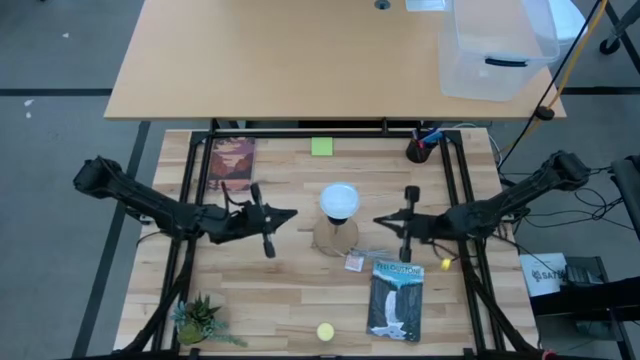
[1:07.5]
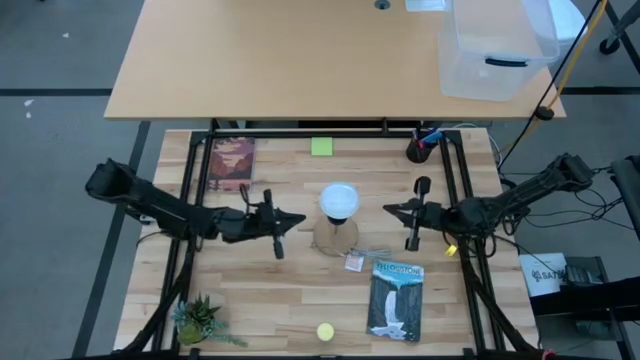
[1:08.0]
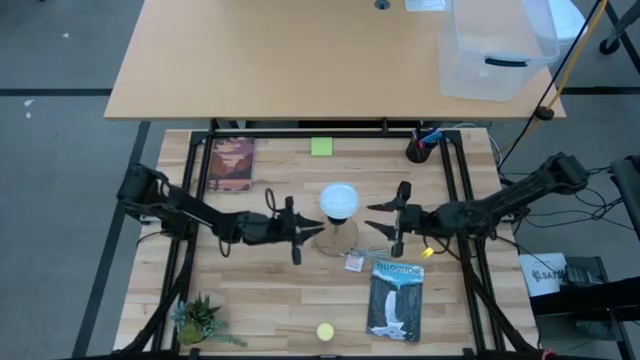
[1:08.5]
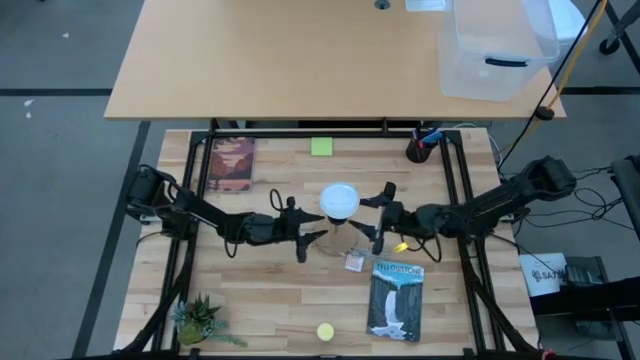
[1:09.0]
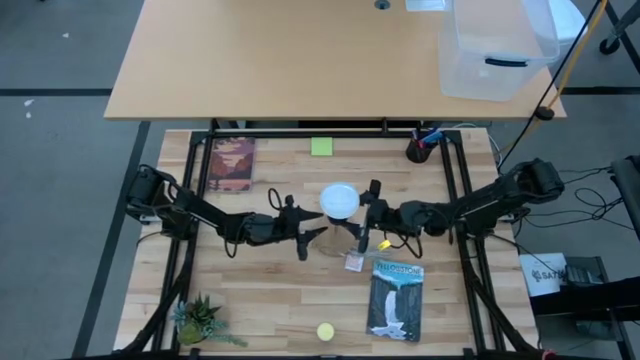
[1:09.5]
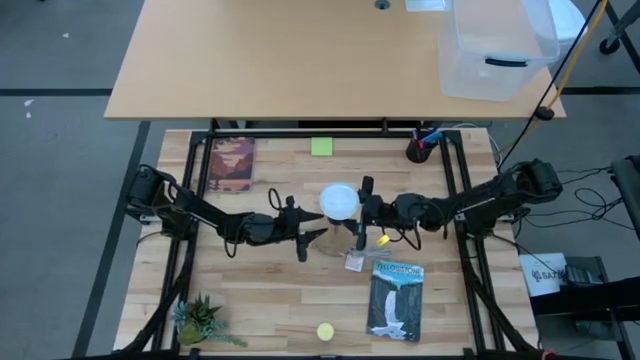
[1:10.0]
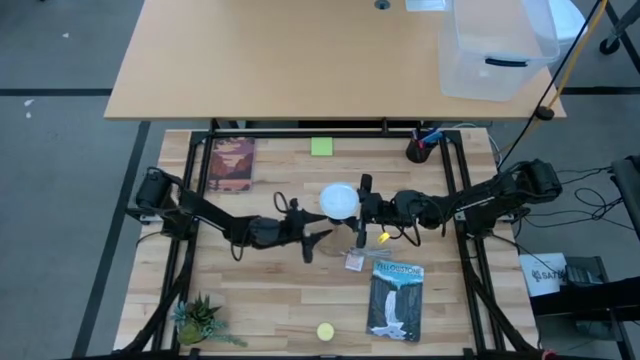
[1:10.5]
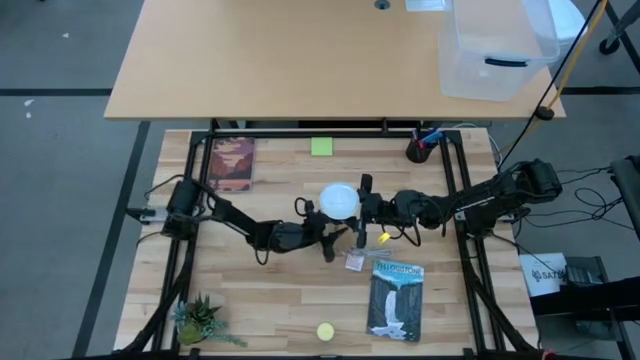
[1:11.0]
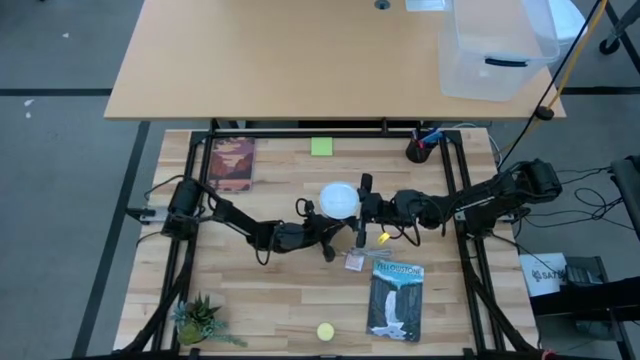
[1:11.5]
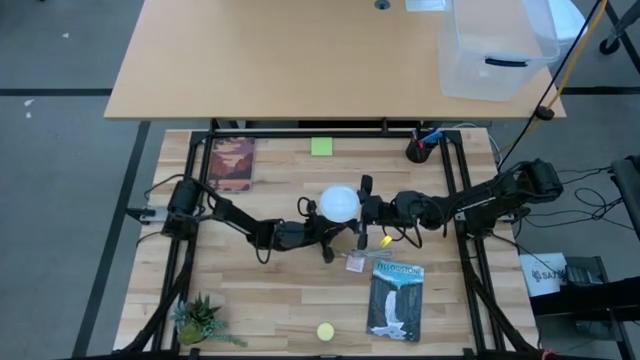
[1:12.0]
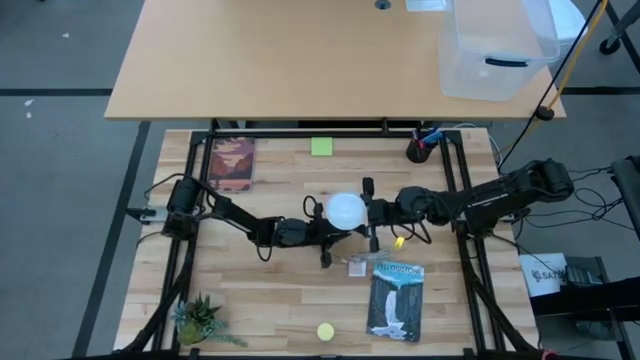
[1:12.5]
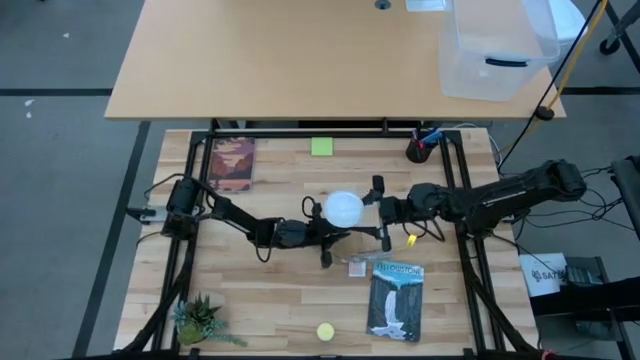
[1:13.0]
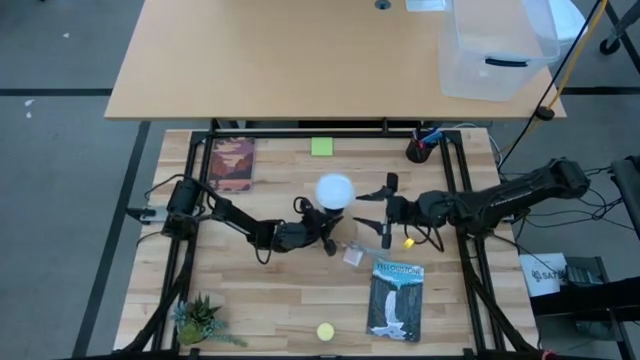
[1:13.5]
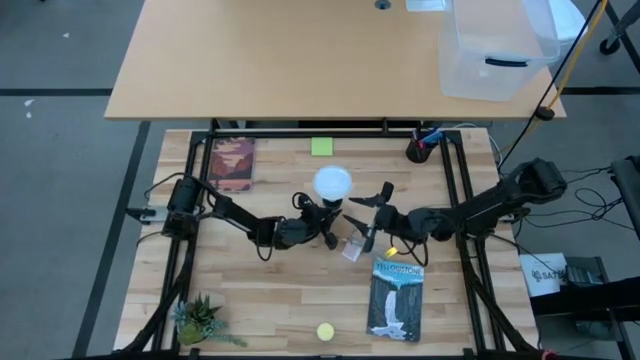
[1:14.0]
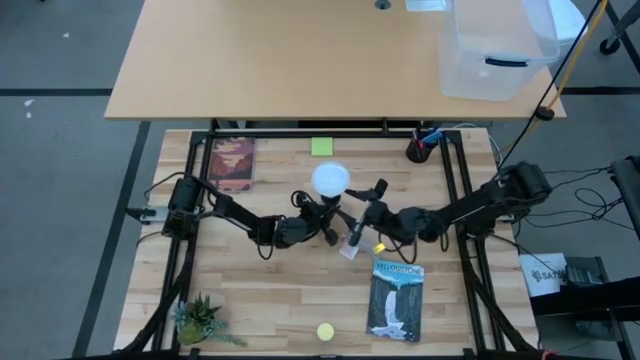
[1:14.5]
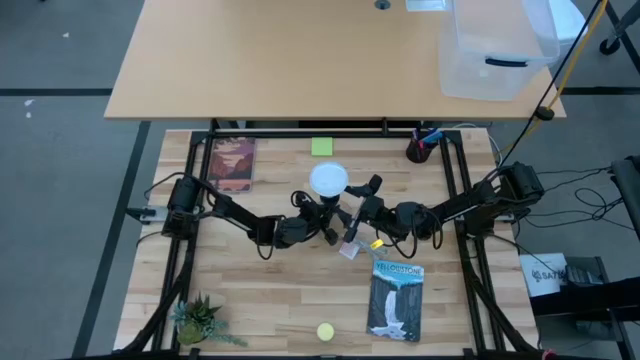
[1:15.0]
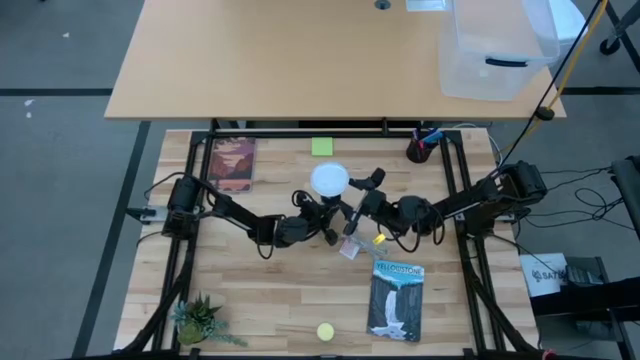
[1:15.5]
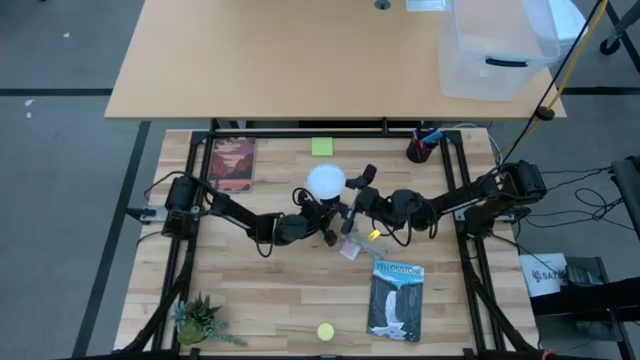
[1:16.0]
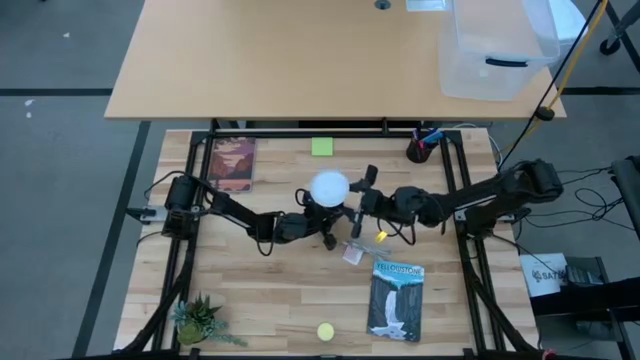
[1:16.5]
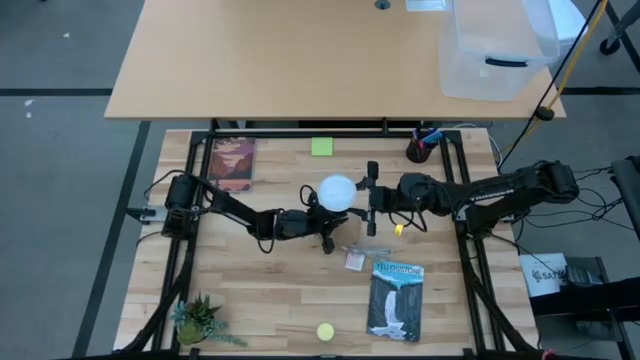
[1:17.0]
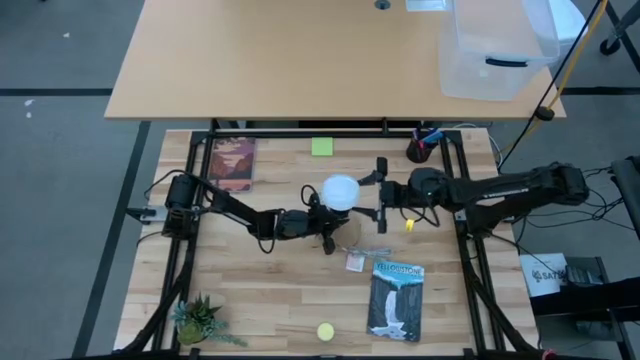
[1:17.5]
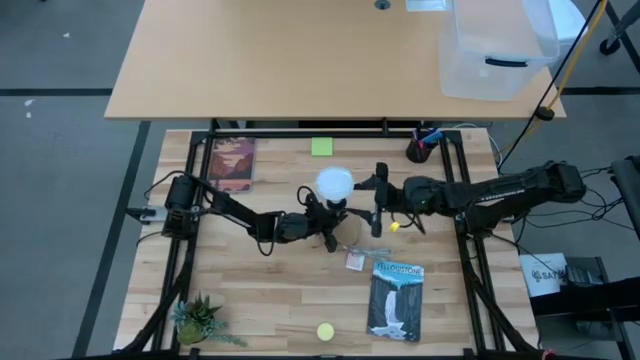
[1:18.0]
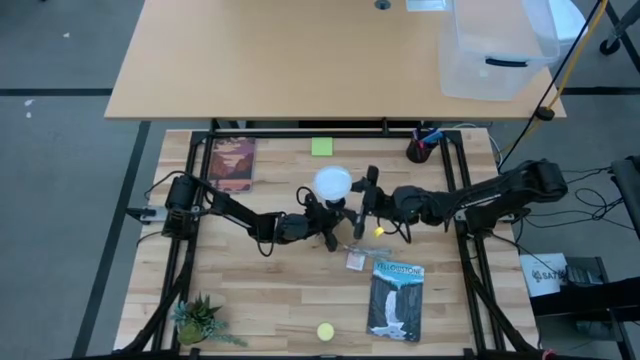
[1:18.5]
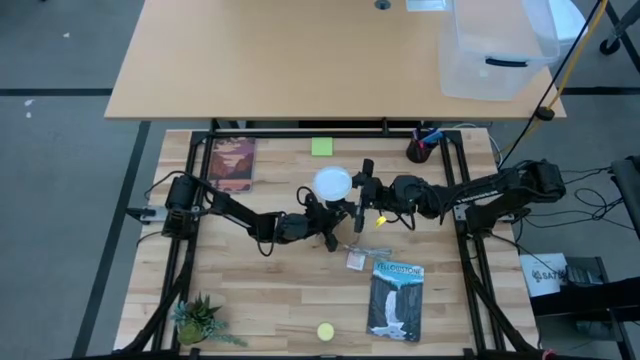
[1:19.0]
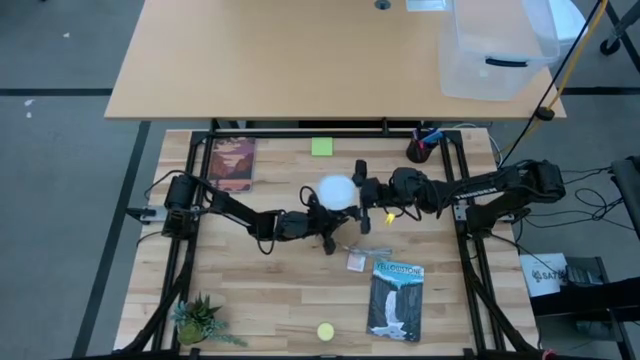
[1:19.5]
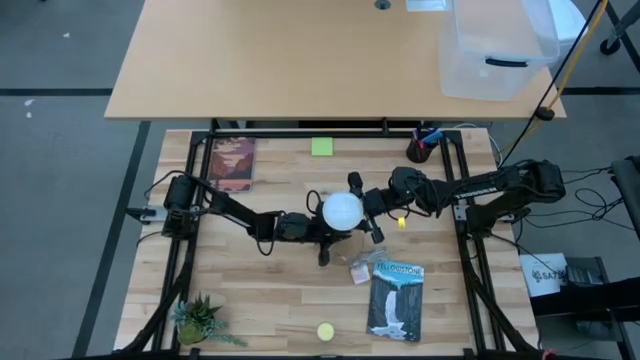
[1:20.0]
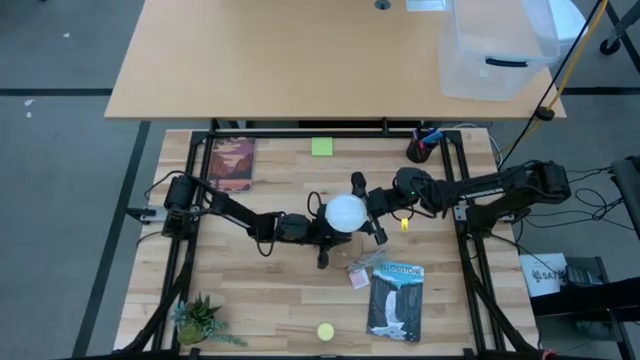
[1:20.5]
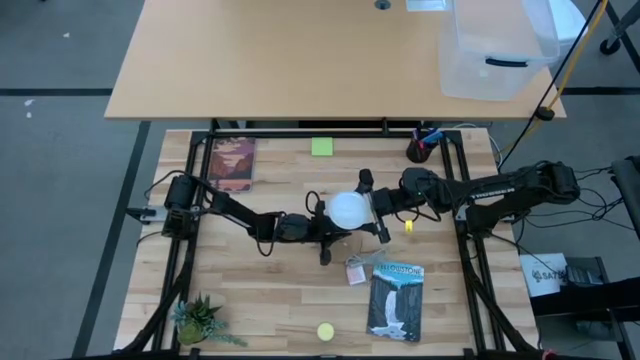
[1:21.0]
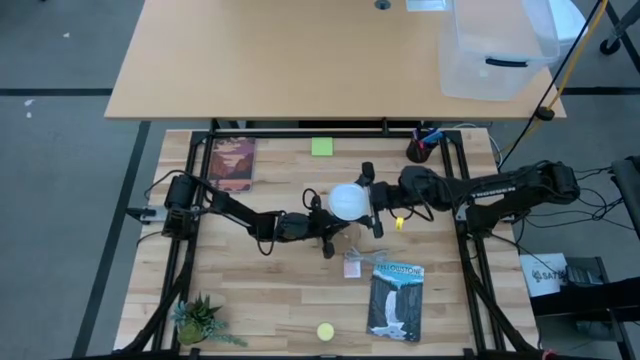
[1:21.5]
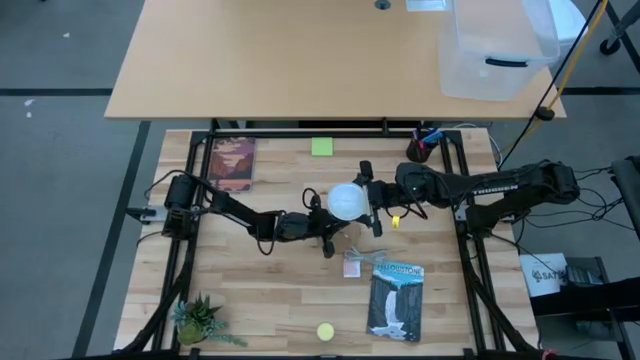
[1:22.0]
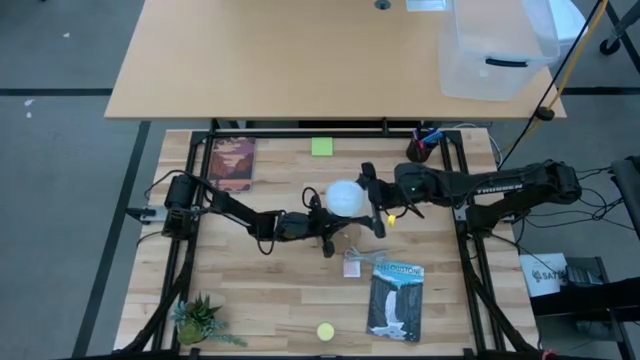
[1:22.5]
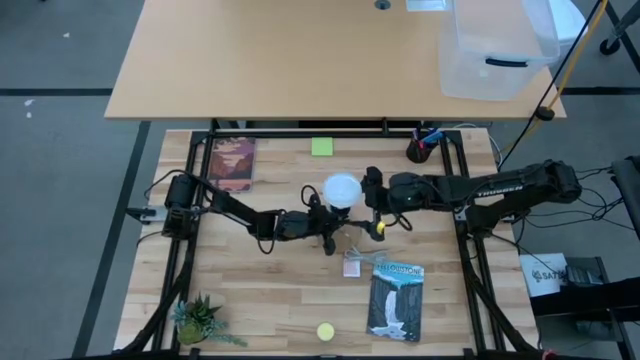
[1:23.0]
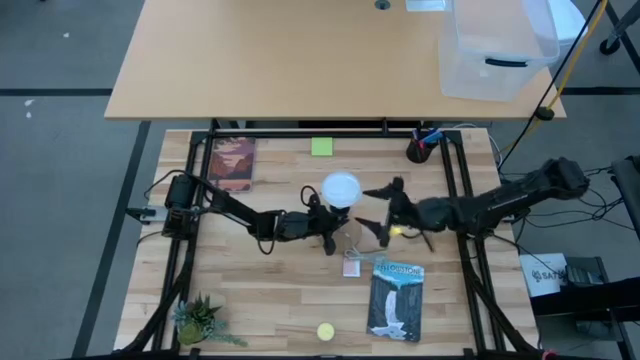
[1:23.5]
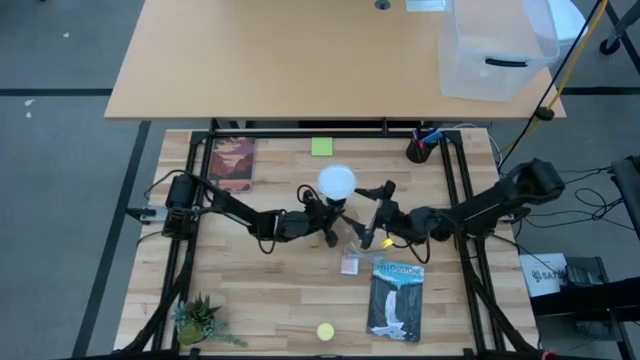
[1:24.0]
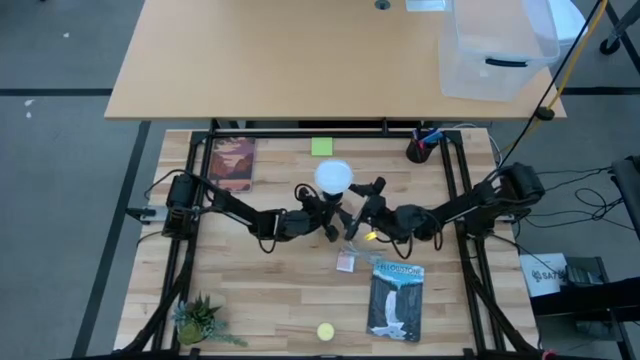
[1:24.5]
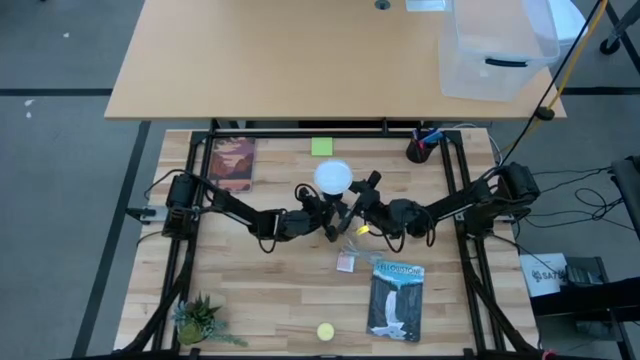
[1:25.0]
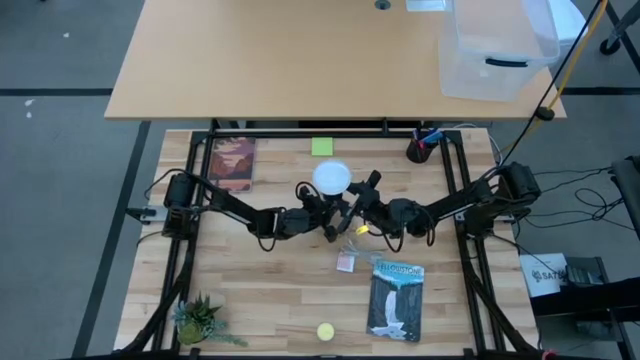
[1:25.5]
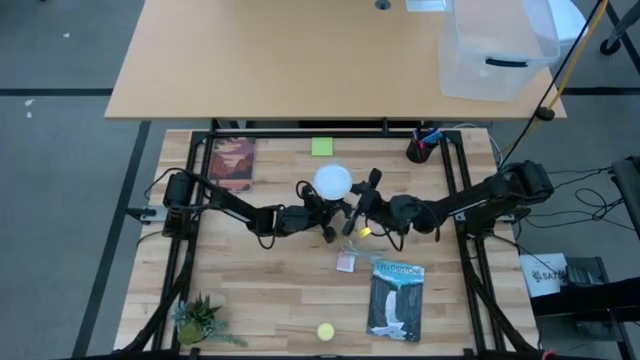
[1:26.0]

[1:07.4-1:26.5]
Task: Screw lightbulb
Remove the white lightbulb from the brown lamp

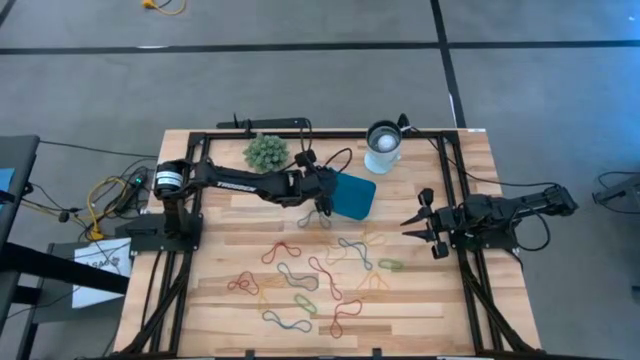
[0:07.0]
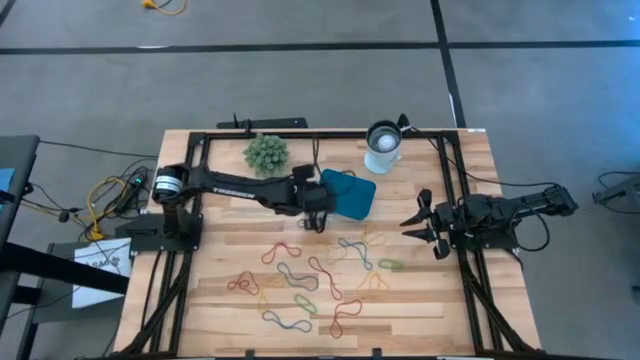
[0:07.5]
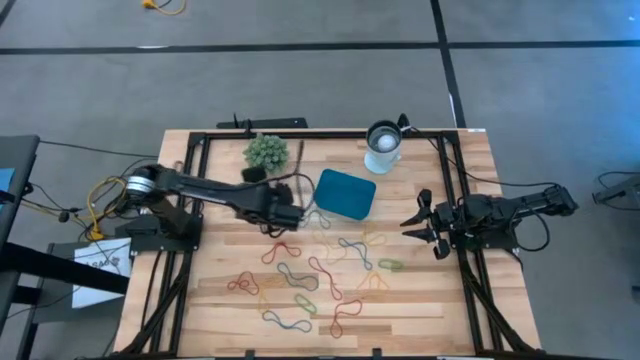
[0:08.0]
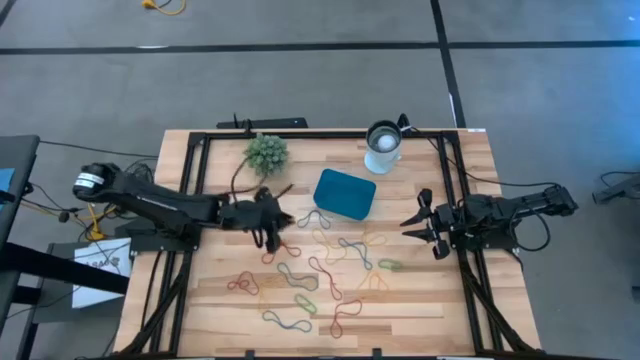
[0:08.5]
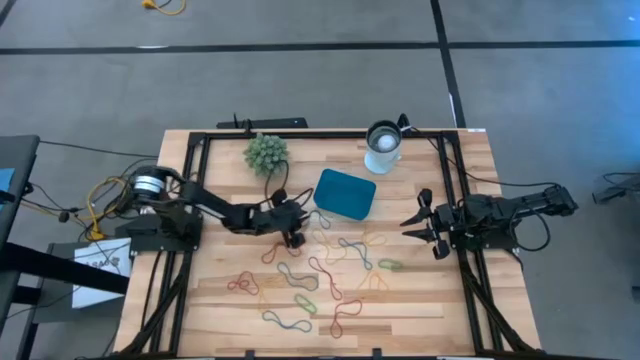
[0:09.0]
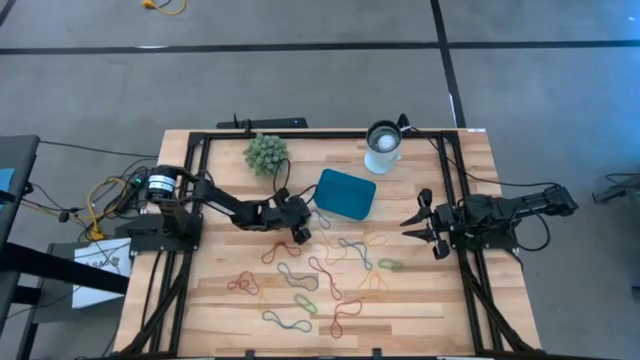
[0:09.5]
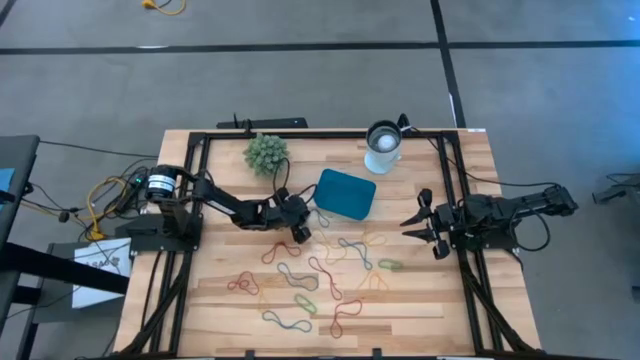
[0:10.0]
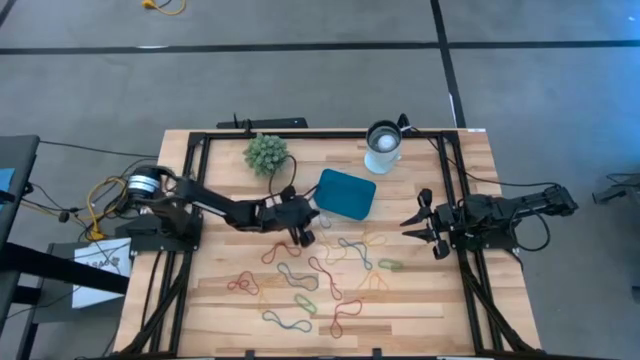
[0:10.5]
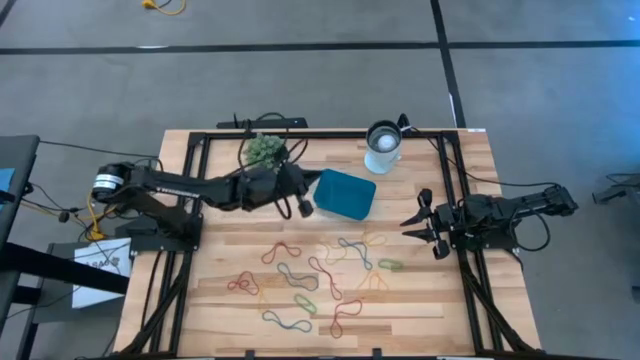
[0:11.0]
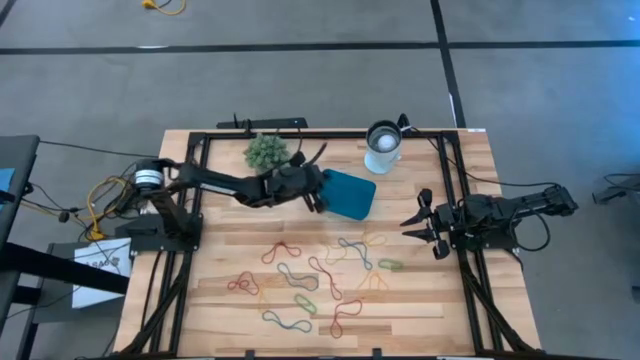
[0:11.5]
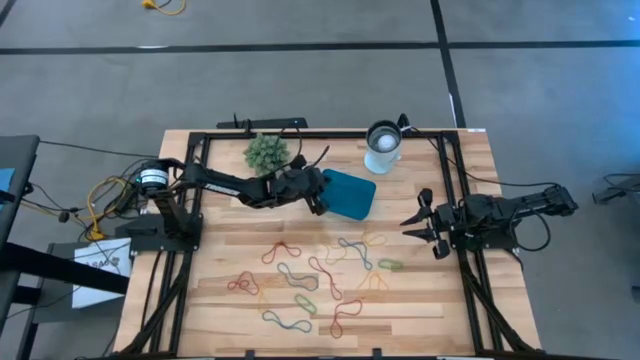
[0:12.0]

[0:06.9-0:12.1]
Task: Pick and place items into bin
Put the blue rubber band into the blue bin
